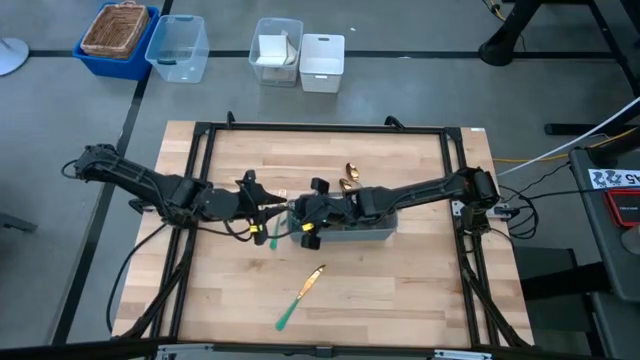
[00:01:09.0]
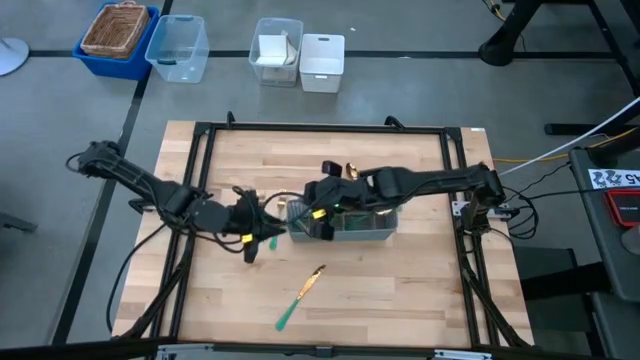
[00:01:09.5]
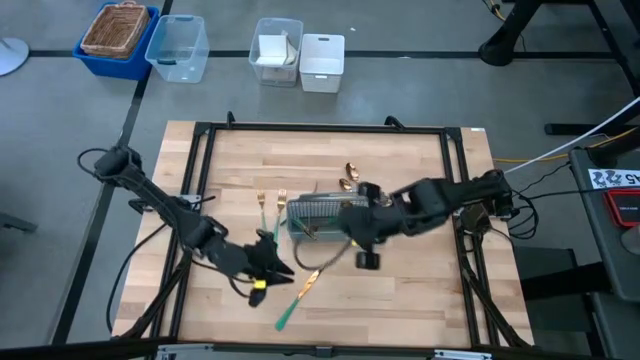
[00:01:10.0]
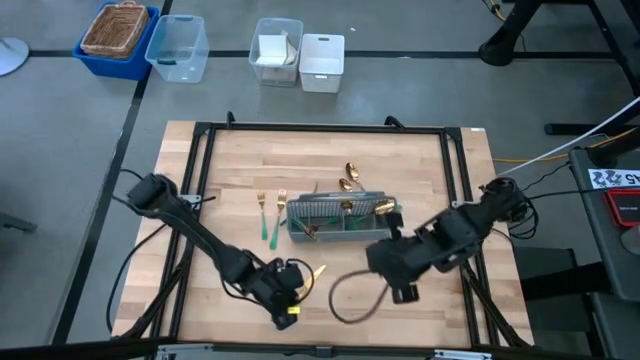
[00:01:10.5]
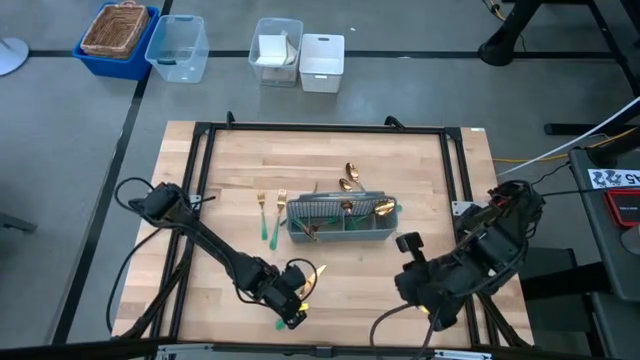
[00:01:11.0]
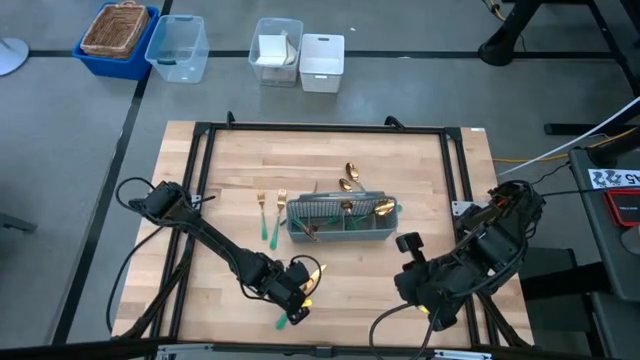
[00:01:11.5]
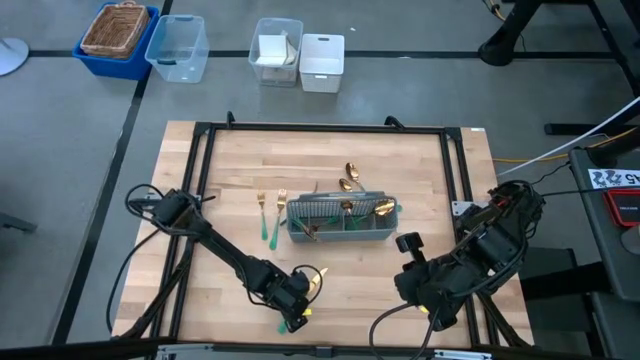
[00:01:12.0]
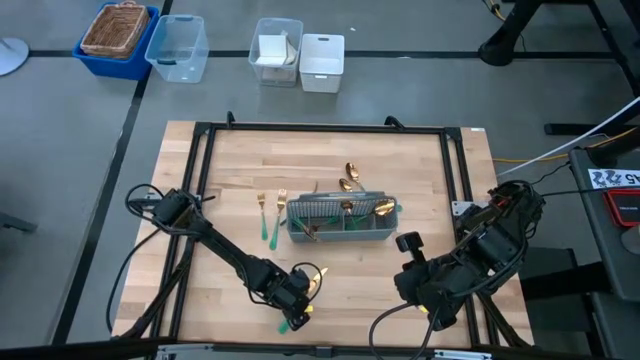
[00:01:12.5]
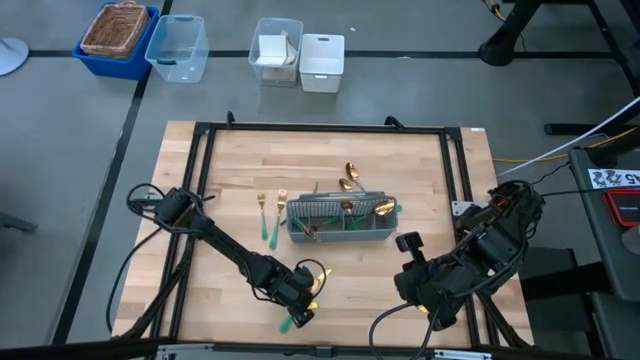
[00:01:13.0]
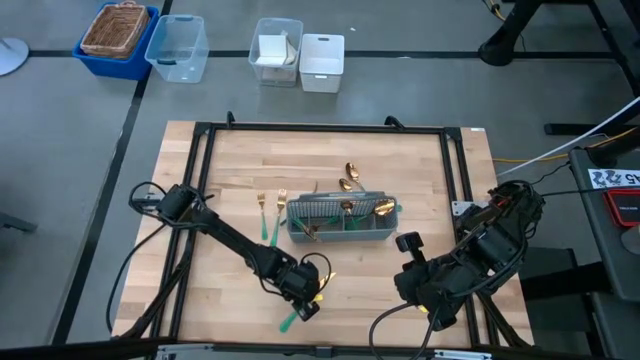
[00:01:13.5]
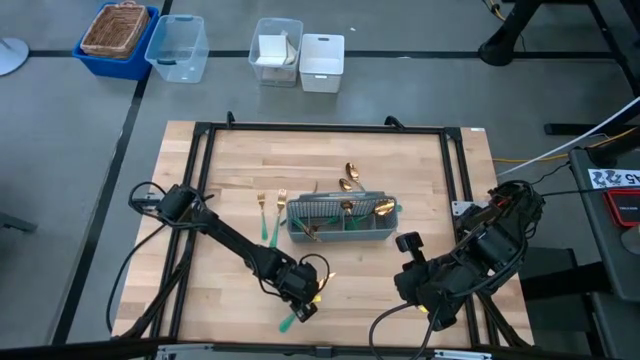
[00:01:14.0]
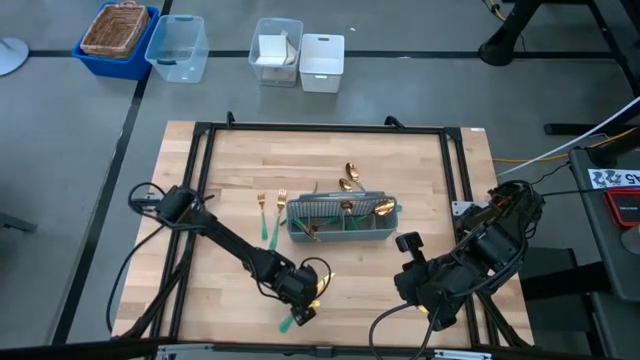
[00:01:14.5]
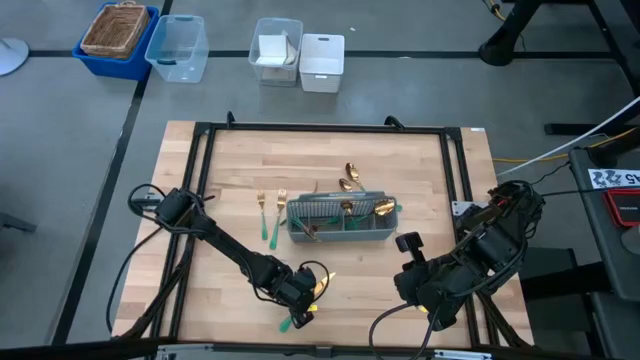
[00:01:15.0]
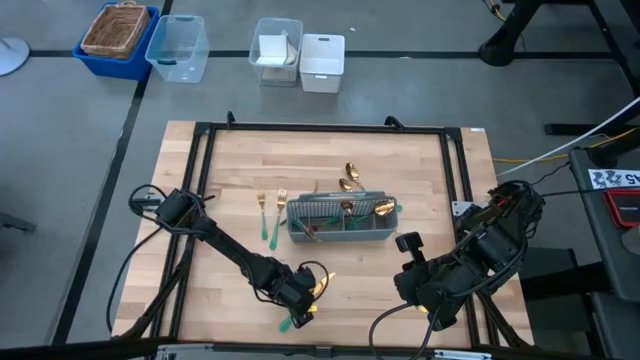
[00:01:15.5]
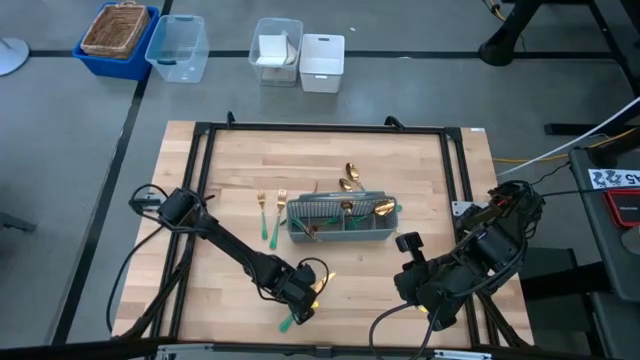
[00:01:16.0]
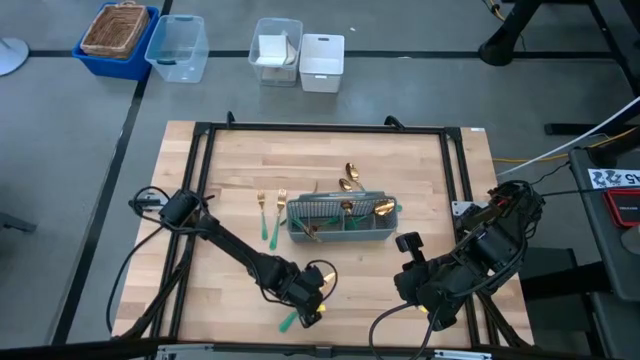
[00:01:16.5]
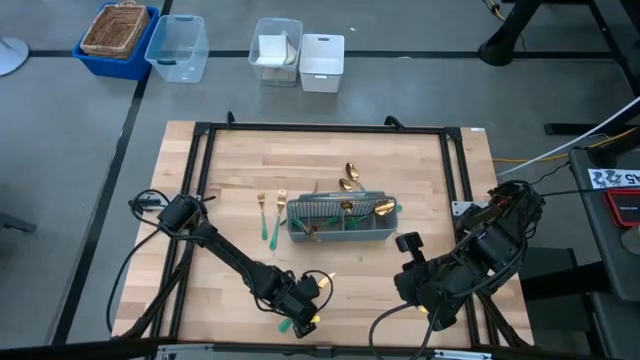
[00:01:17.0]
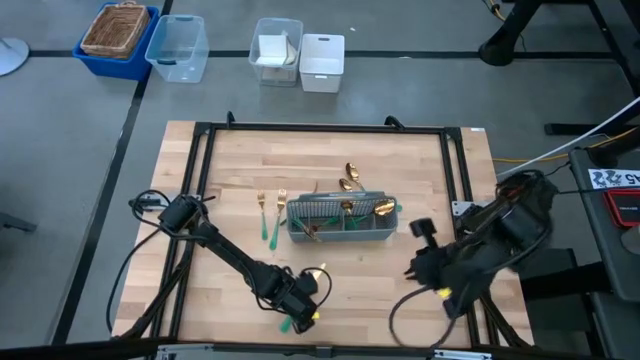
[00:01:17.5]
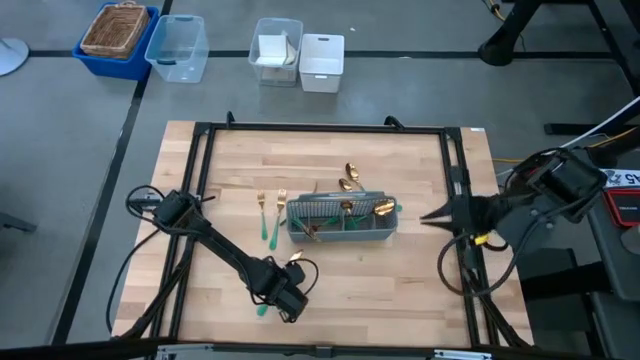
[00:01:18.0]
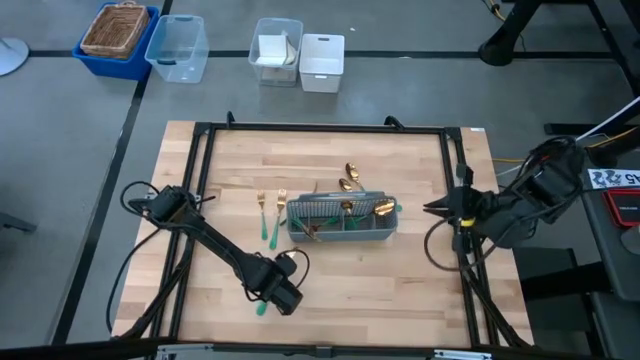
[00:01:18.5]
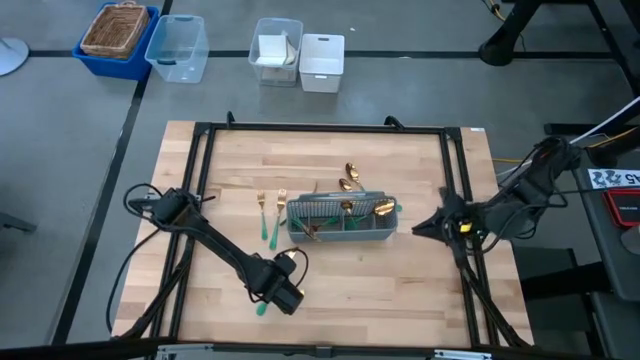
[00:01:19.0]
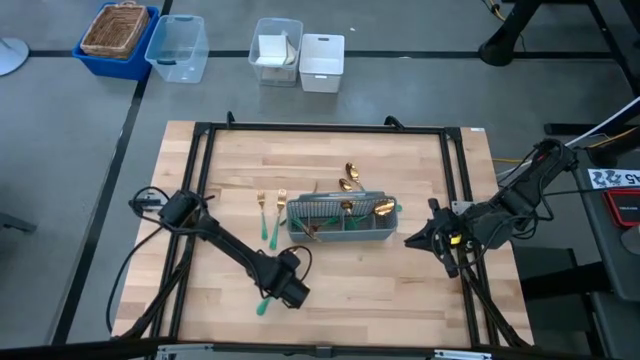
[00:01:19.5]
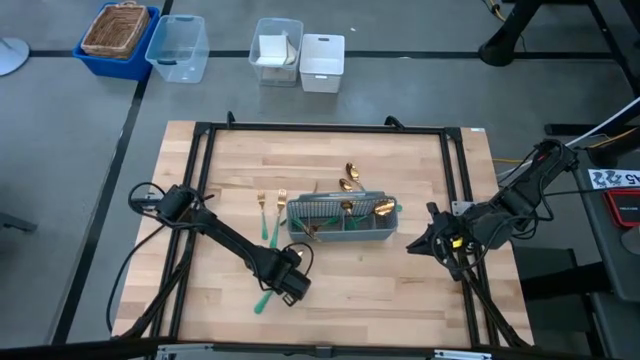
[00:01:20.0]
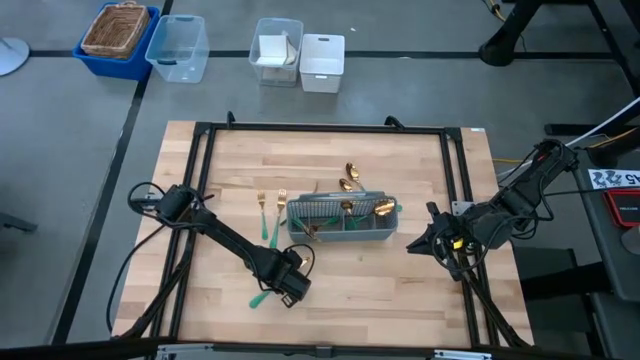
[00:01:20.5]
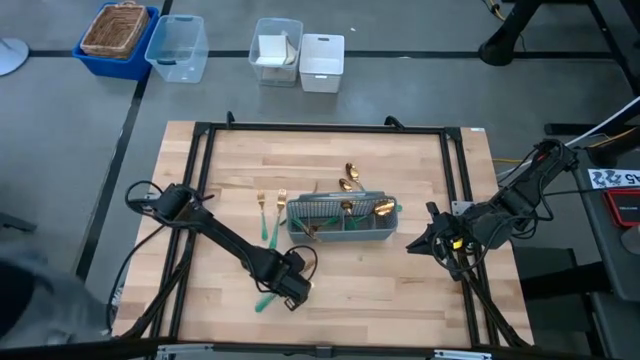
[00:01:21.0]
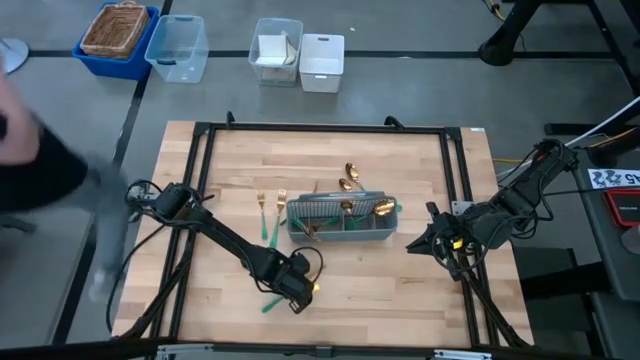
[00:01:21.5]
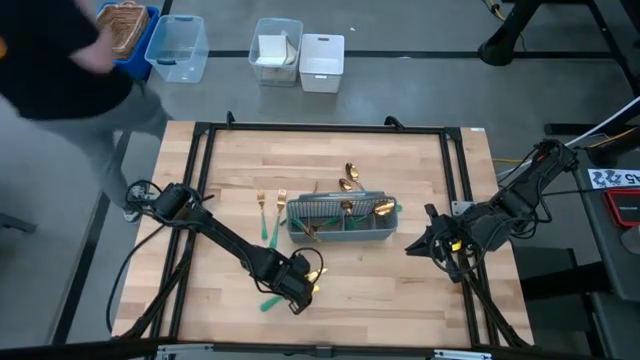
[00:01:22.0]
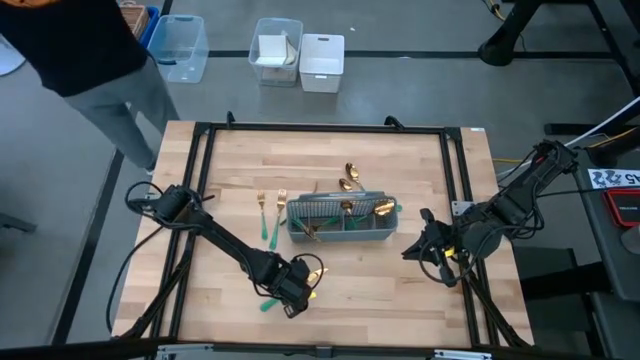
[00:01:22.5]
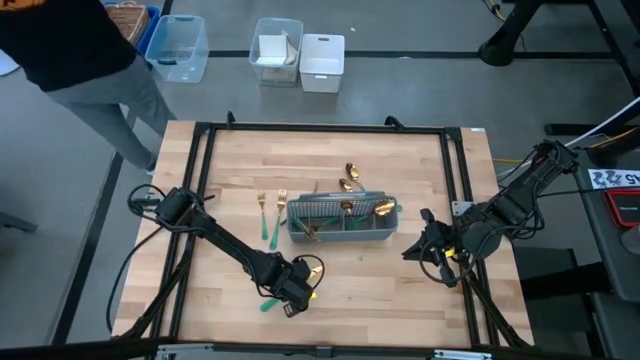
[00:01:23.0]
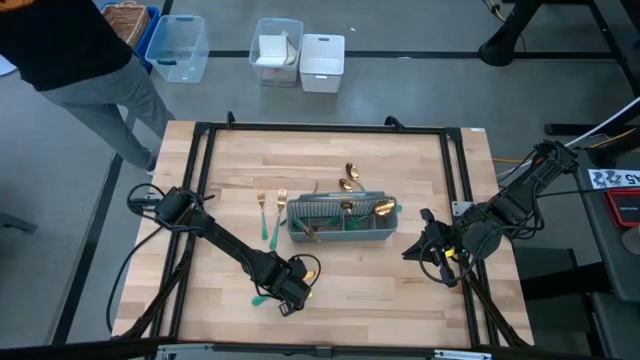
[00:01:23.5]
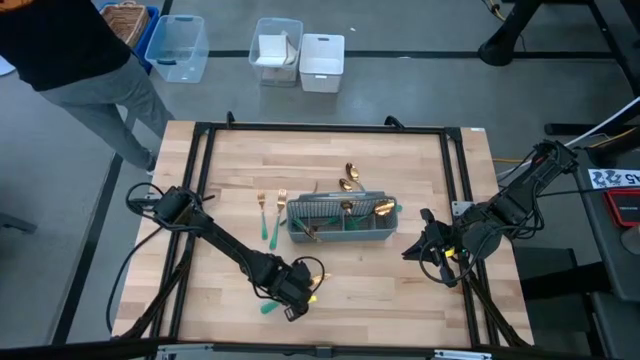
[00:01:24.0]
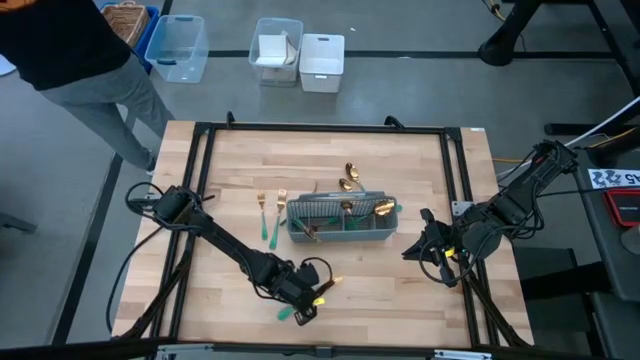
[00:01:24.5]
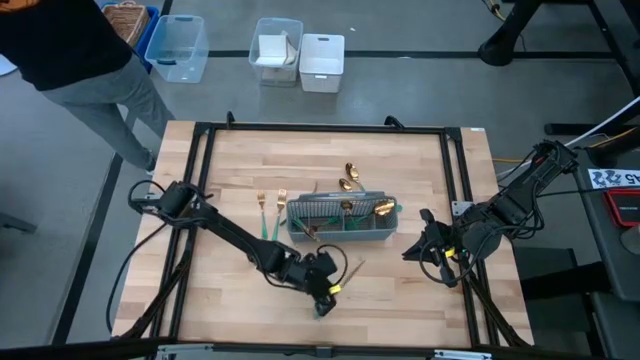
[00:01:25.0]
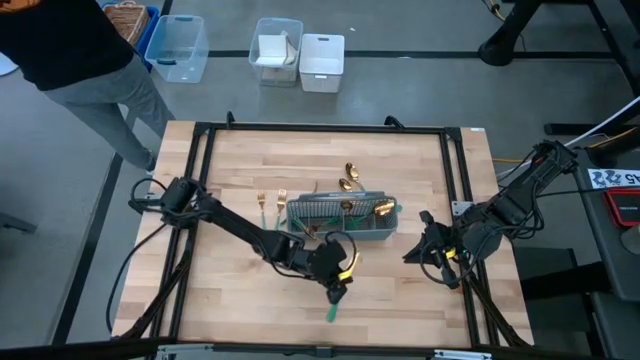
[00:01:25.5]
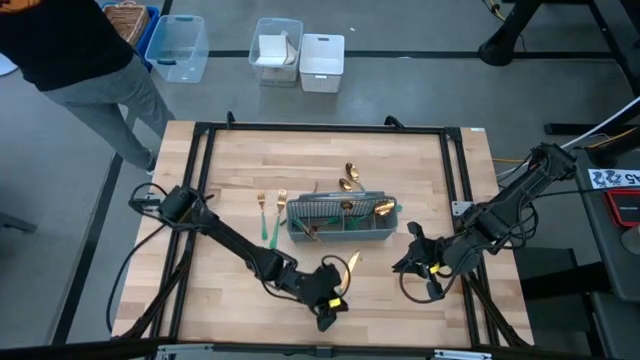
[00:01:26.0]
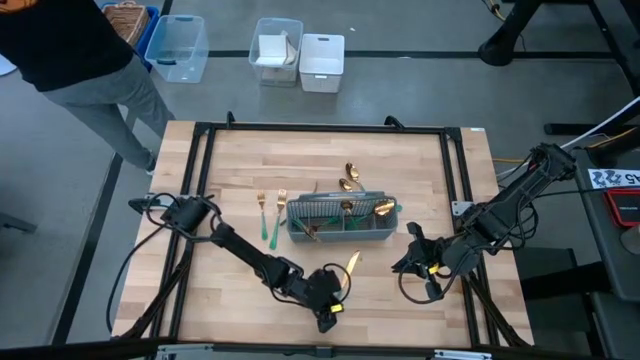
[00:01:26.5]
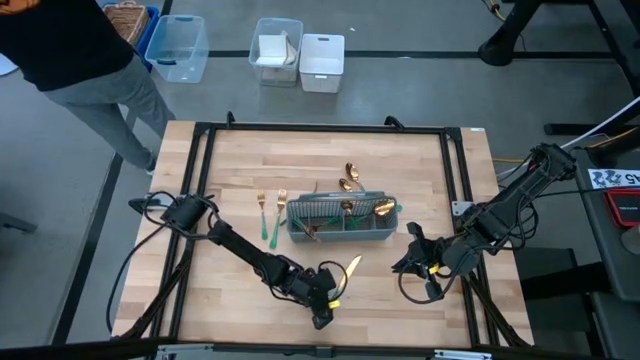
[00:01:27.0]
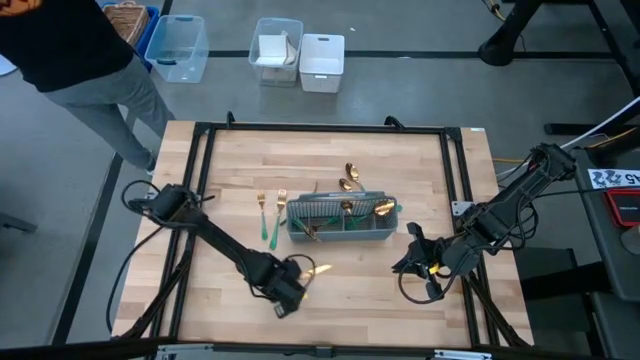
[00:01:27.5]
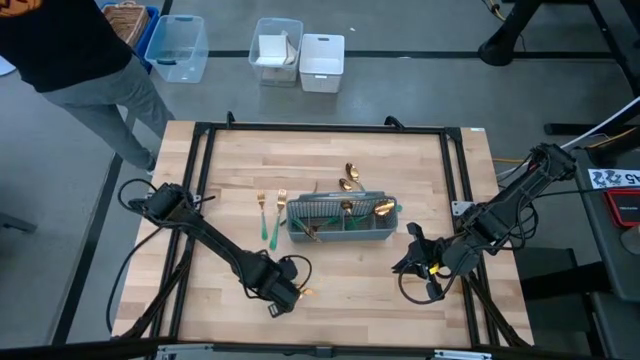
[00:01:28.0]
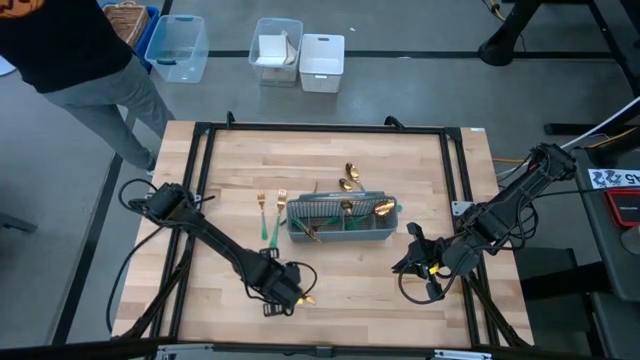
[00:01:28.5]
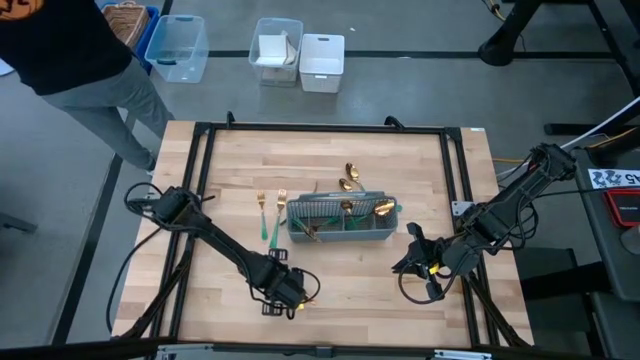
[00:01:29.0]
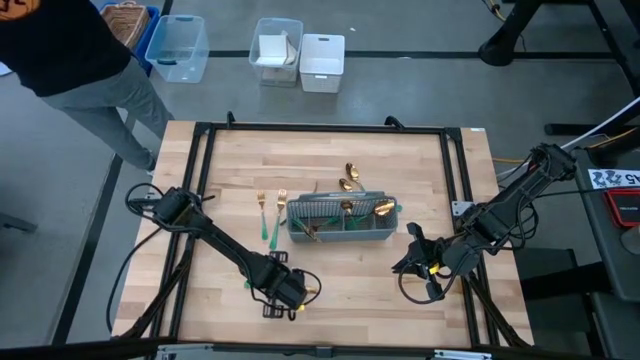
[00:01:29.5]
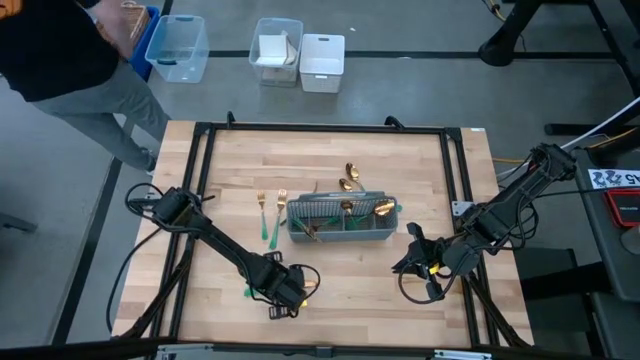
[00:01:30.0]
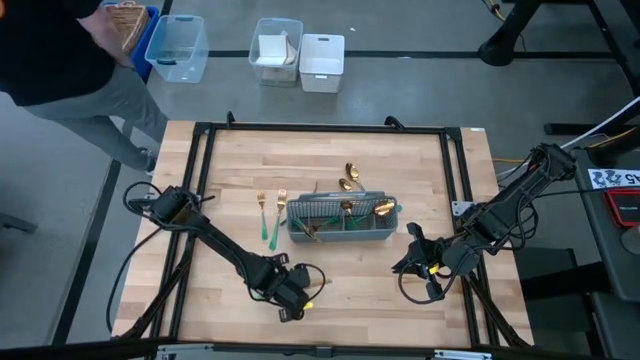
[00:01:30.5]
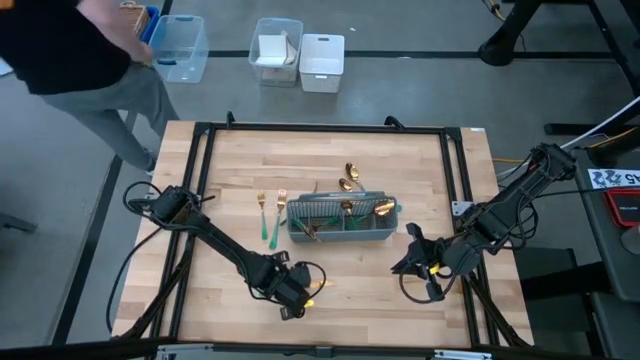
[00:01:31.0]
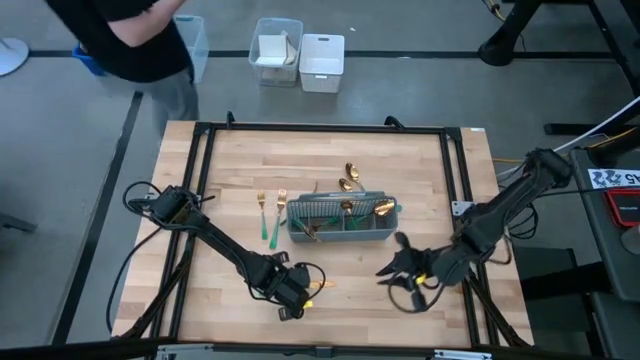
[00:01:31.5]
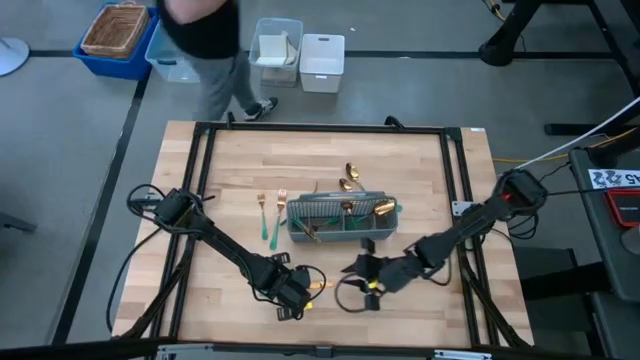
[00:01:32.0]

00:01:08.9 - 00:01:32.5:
Task: Sort silverware
Put the green knife into the gray utensil holder
